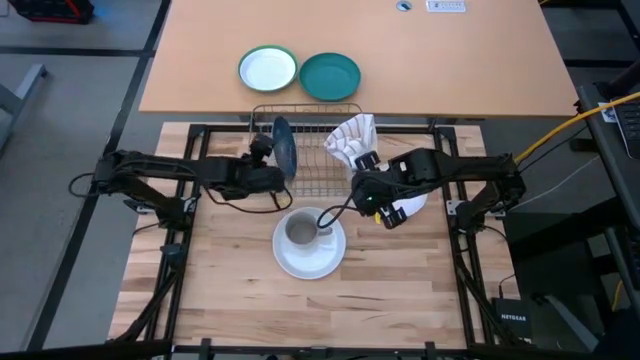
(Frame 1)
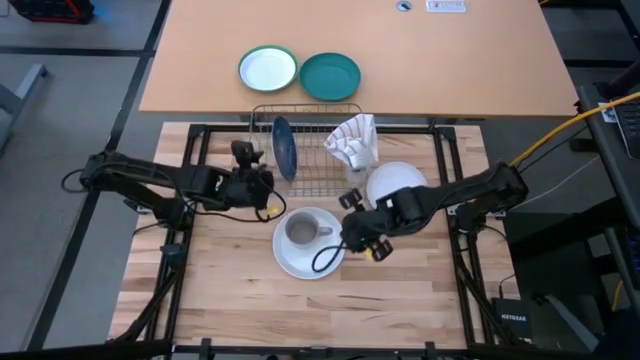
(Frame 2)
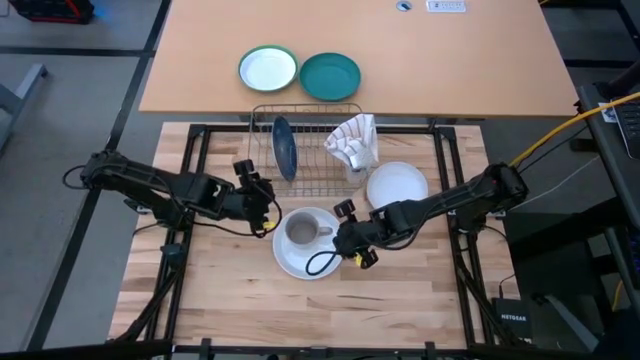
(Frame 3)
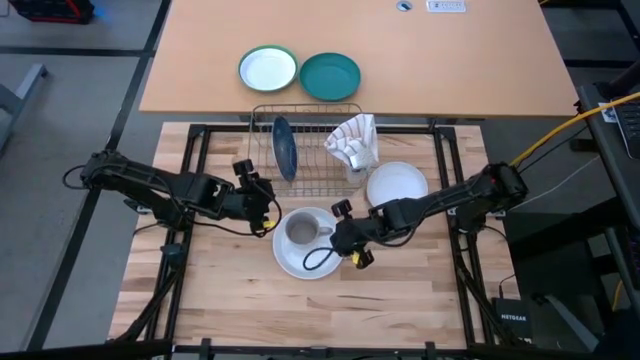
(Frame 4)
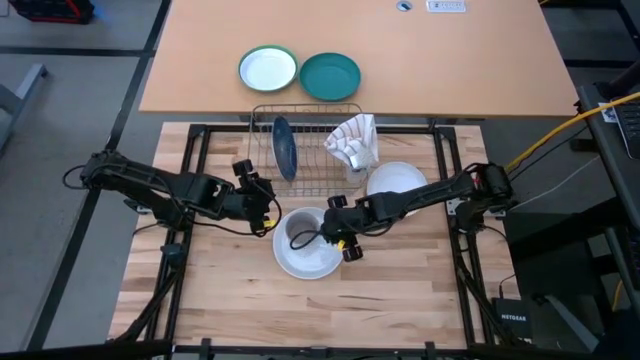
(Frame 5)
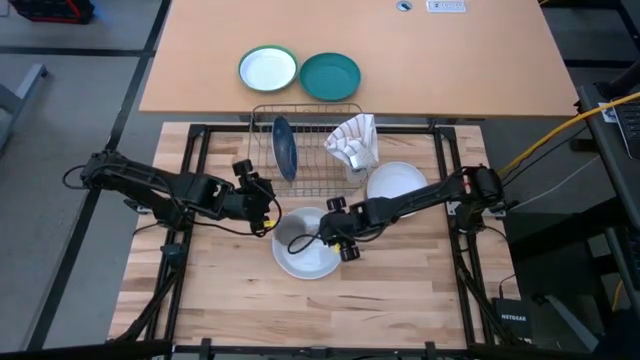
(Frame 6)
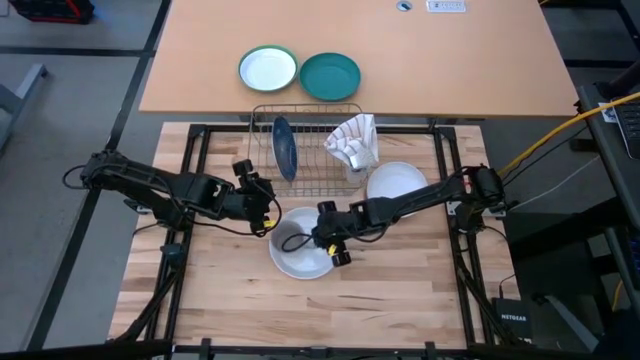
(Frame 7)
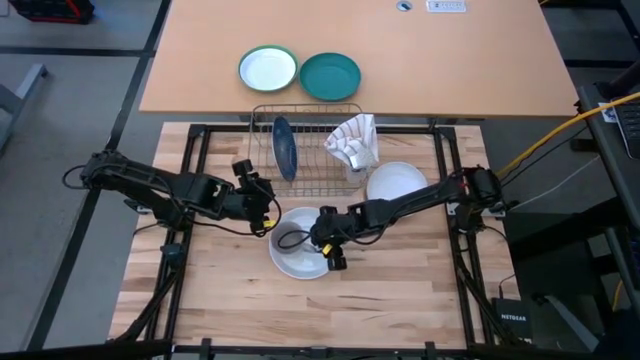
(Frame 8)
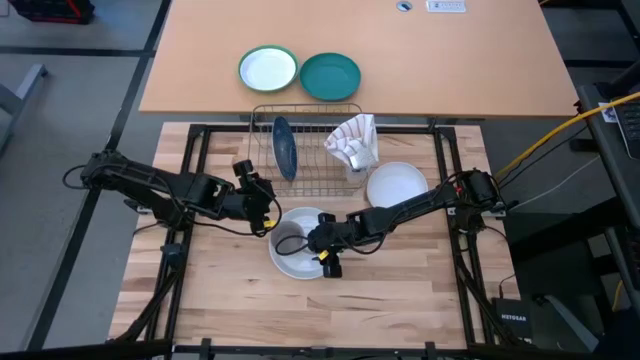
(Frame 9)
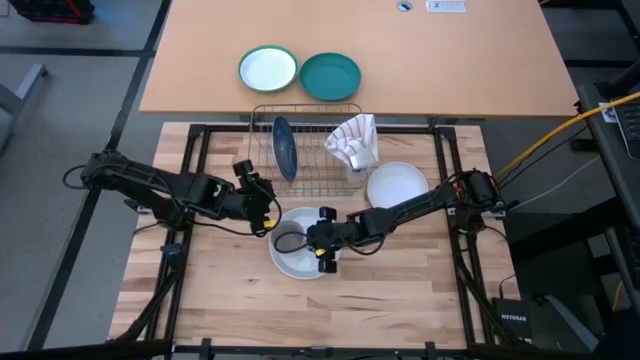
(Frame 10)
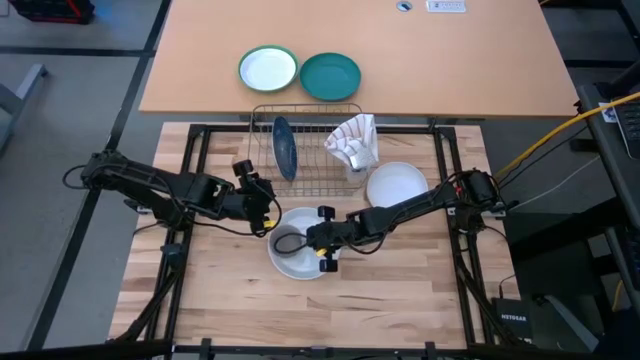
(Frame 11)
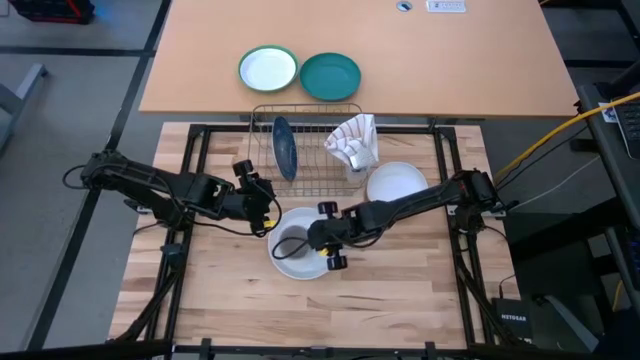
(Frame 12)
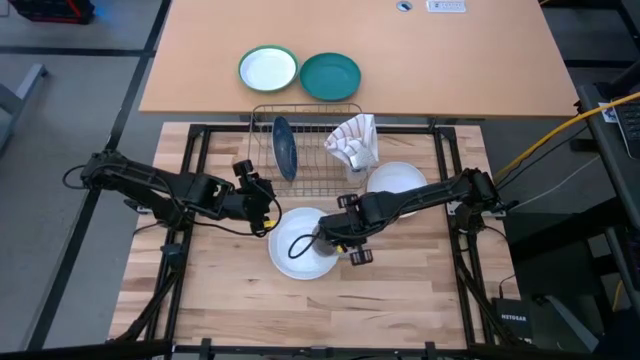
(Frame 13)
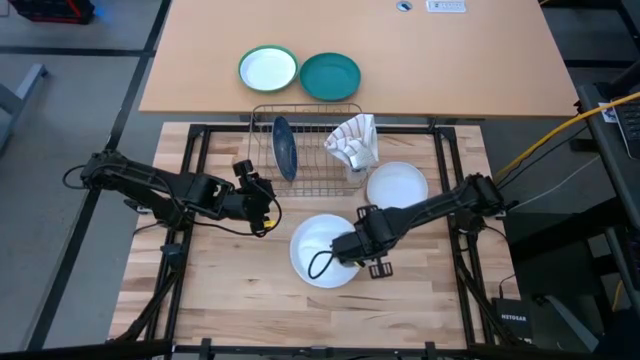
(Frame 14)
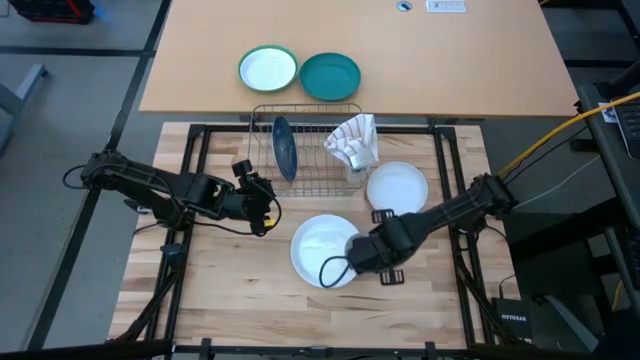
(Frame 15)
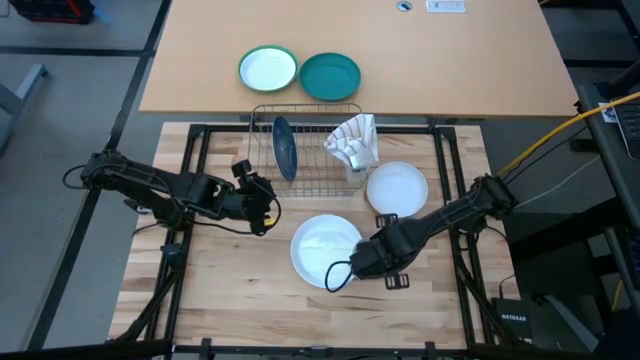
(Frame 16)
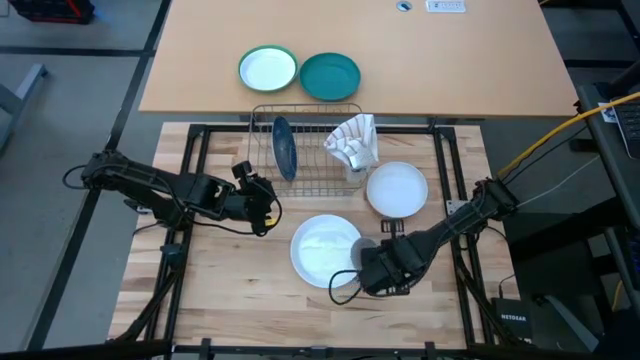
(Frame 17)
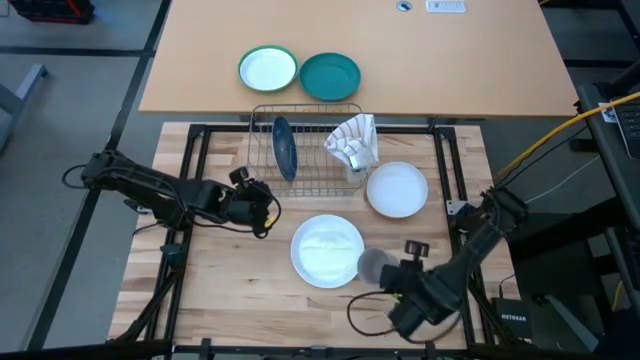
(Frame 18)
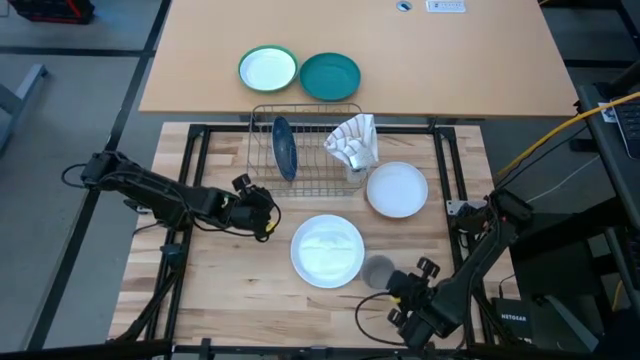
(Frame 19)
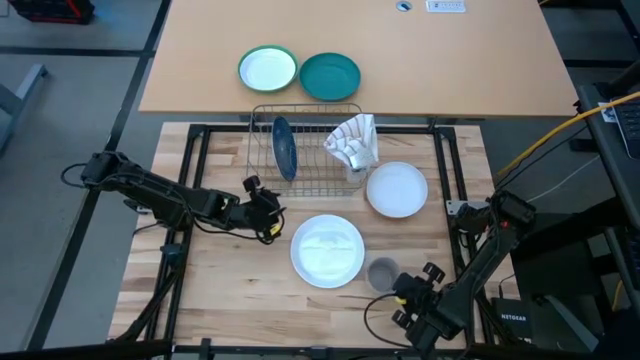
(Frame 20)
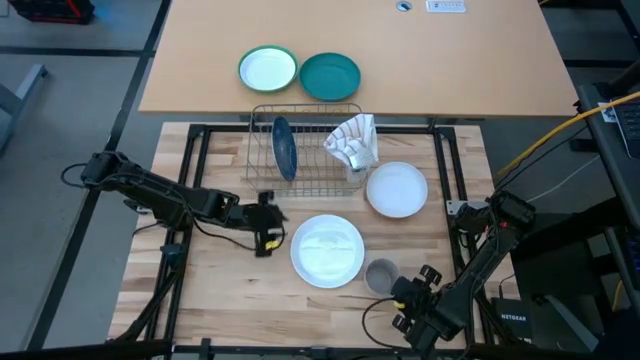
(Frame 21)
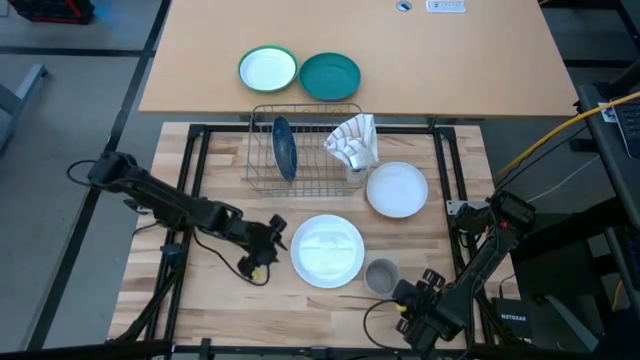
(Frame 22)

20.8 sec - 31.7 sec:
Task: Sort dishes
Remove the mug from the white plate

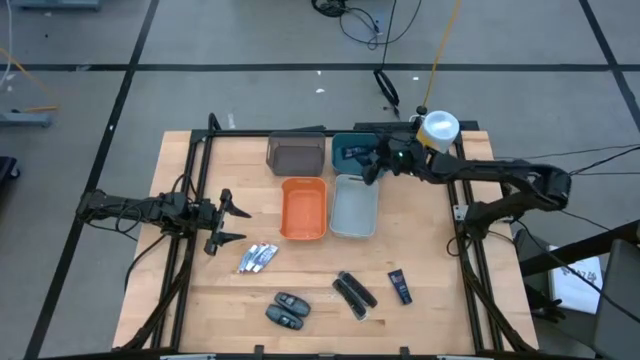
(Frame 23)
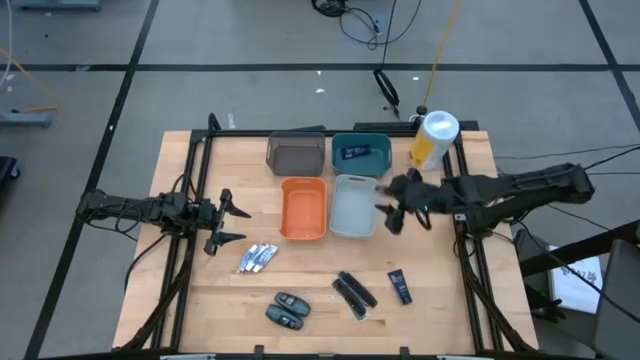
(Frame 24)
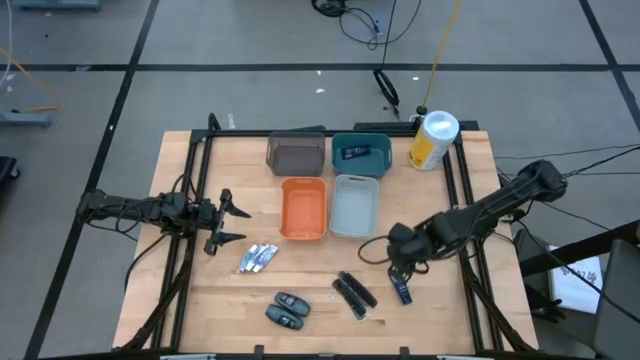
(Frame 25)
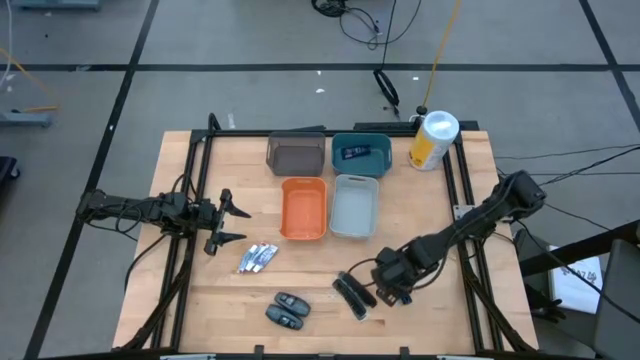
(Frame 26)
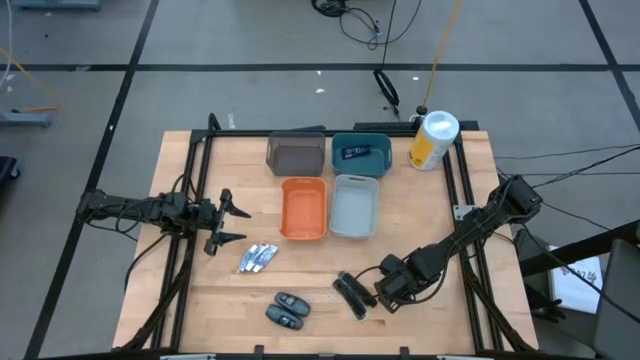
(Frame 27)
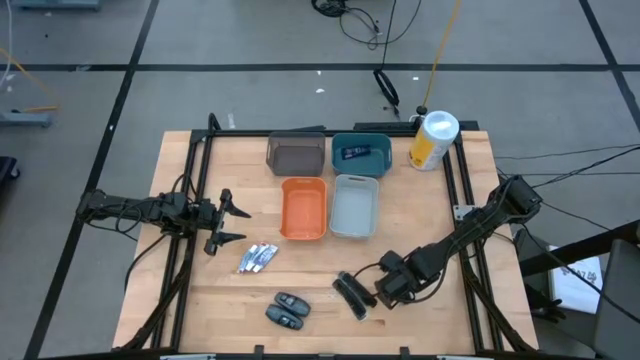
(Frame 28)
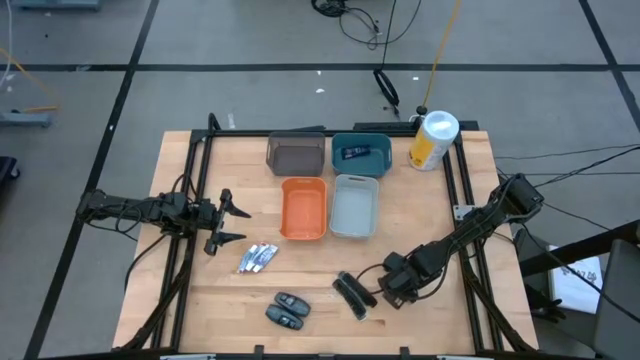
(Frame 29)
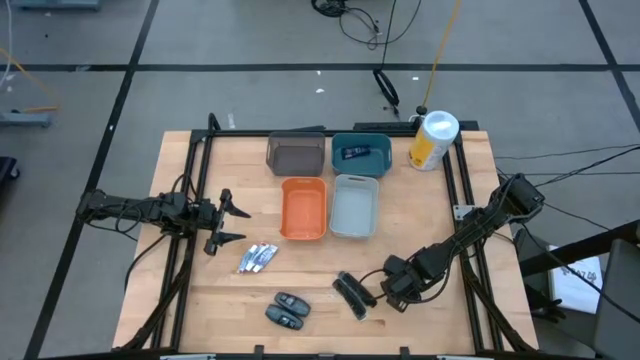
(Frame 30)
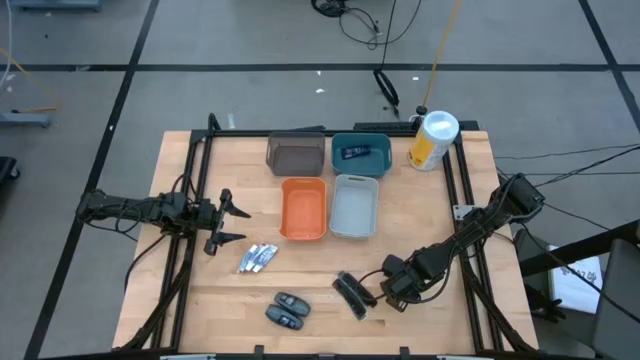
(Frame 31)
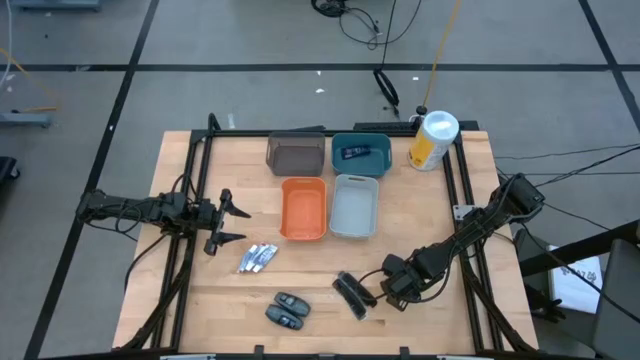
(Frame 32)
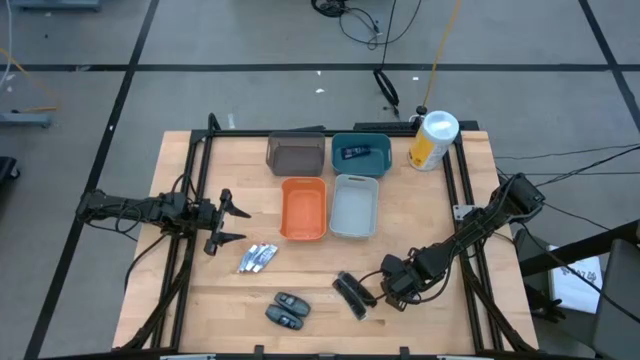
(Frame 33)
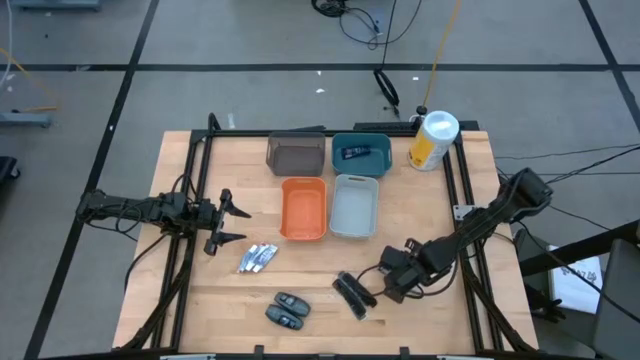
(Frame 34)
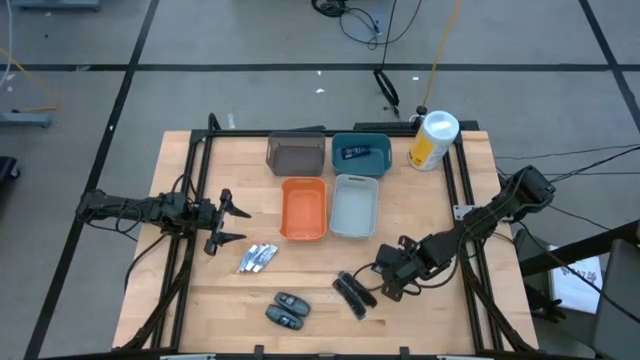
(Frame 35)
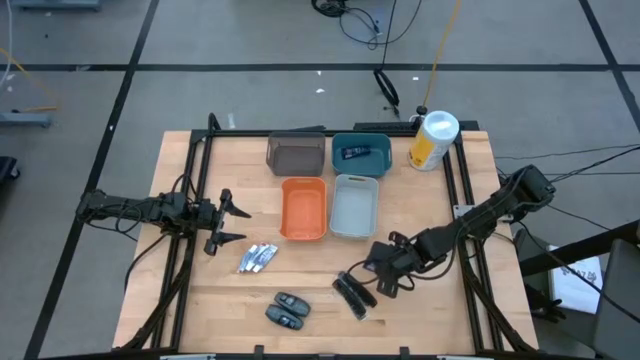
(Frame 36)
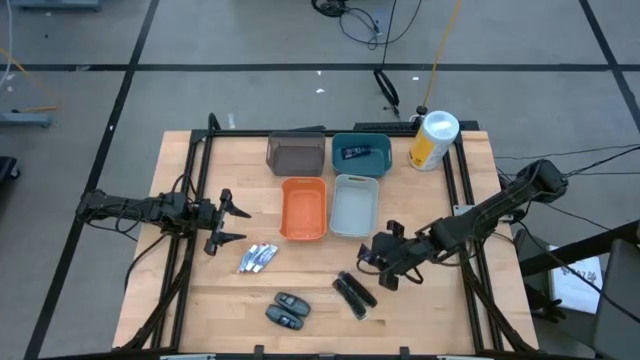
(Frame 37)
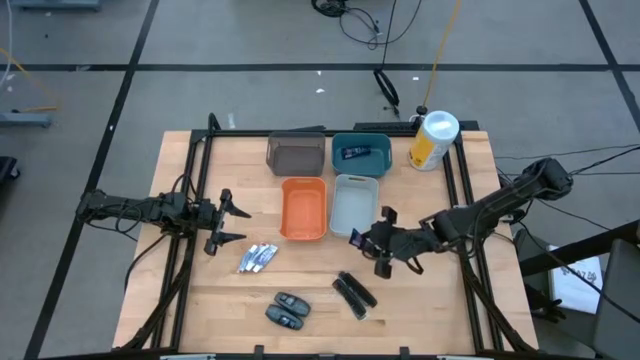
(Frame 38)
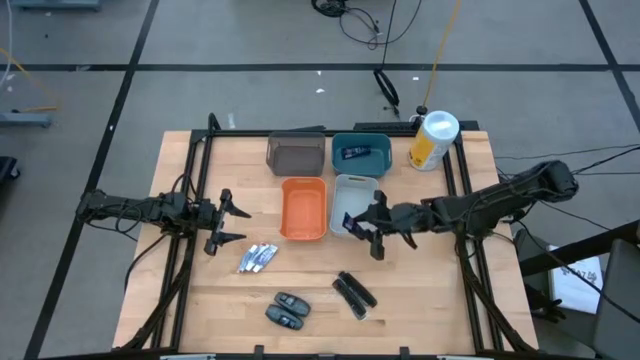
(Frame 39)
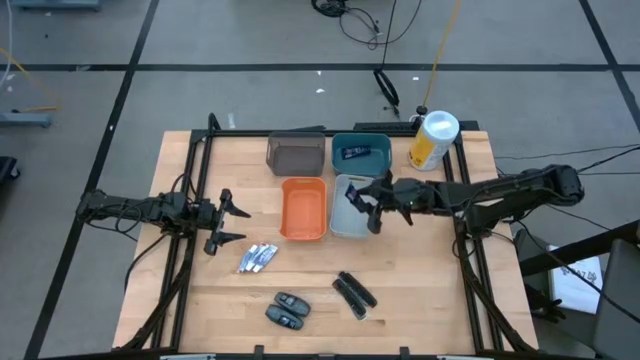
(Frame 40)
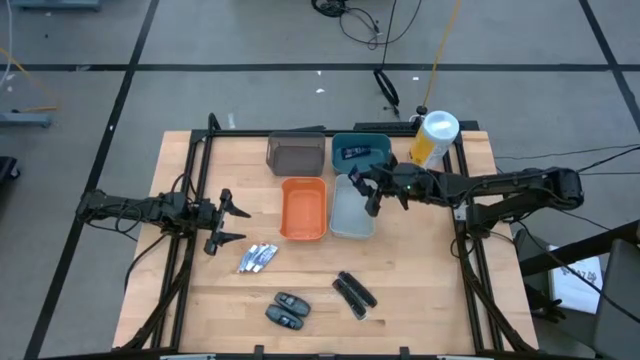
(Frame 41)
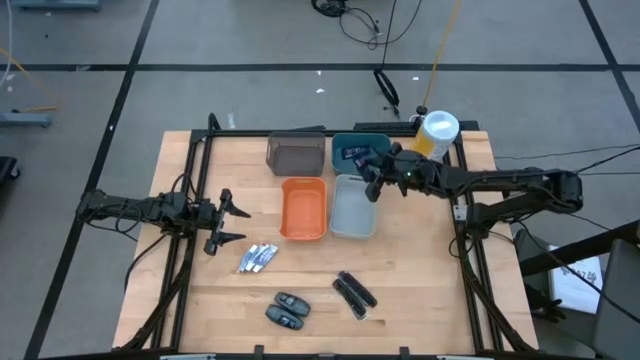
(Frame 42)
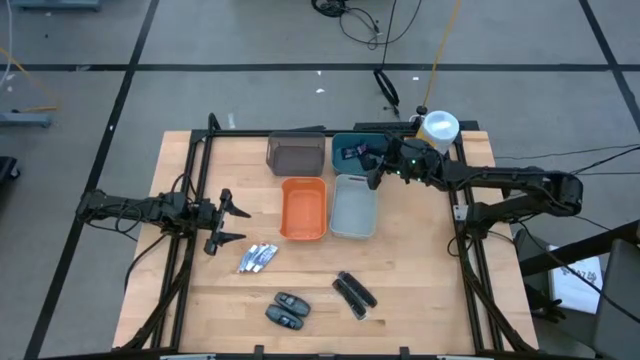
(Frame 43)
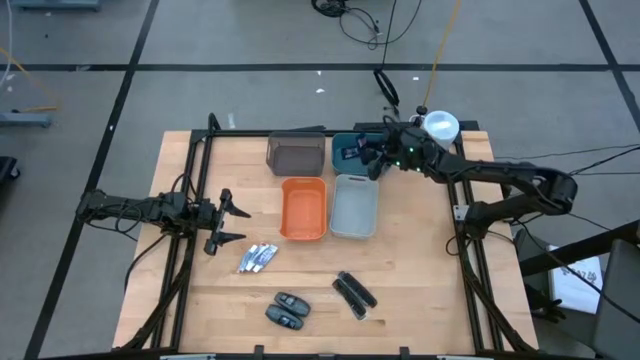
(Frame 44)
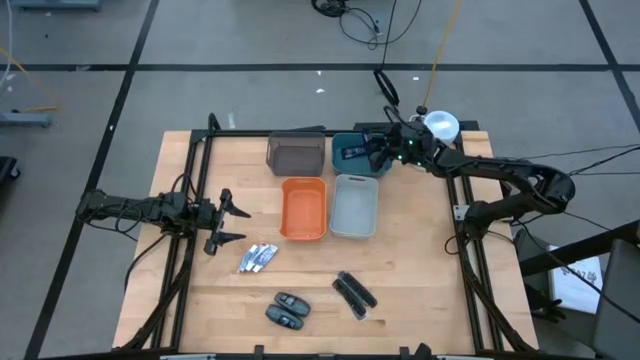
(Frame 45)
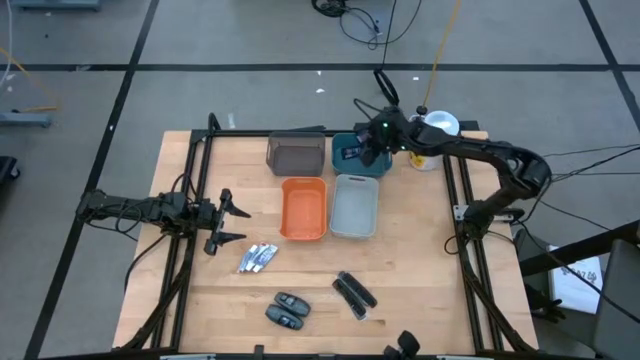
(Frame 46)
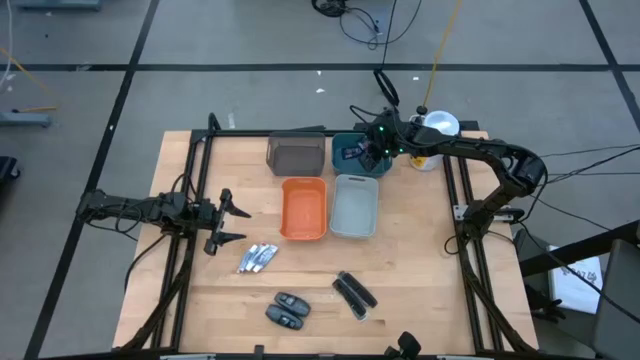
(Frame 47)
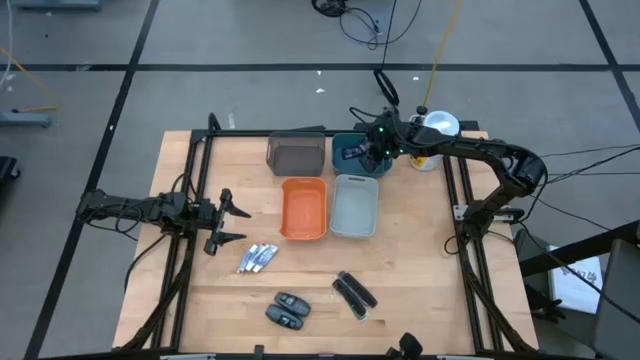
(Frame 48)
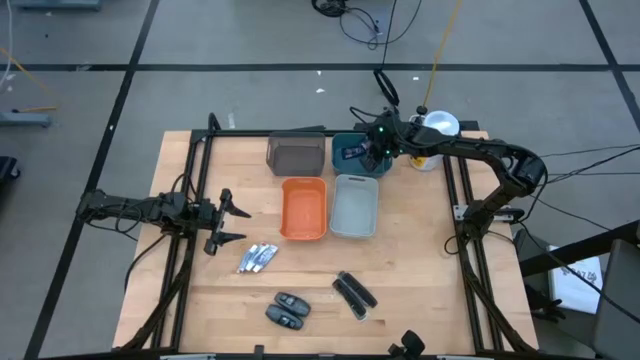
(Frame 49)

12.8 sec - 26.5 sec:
Task: Pick & Place Travel size toiletries
Put the blue shave cream into the dark blue bin
